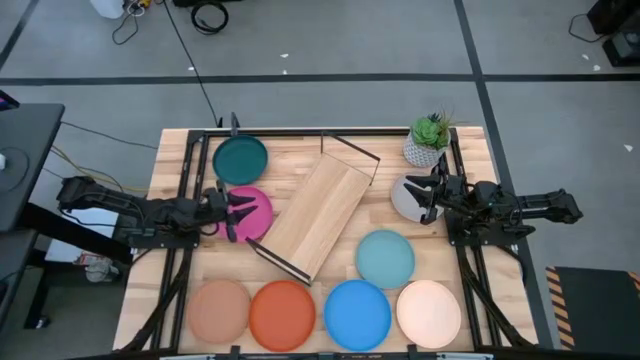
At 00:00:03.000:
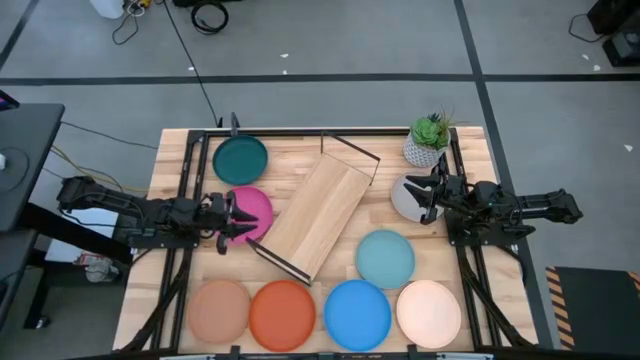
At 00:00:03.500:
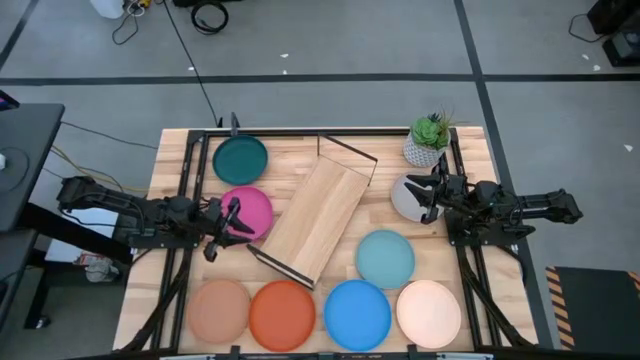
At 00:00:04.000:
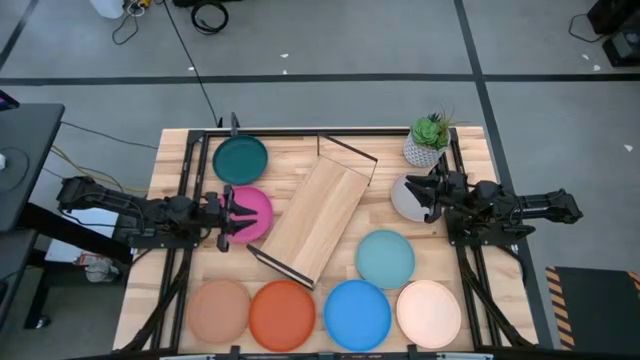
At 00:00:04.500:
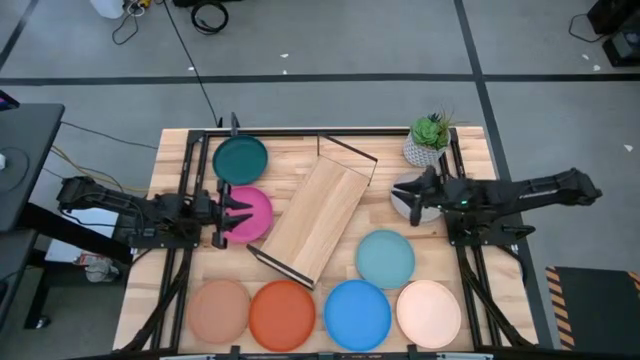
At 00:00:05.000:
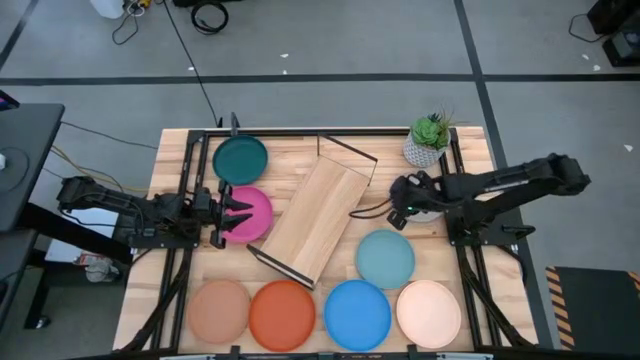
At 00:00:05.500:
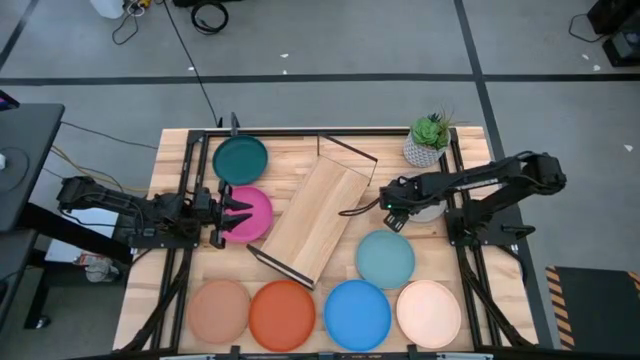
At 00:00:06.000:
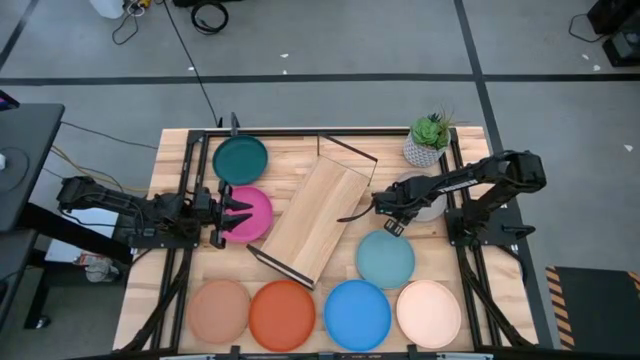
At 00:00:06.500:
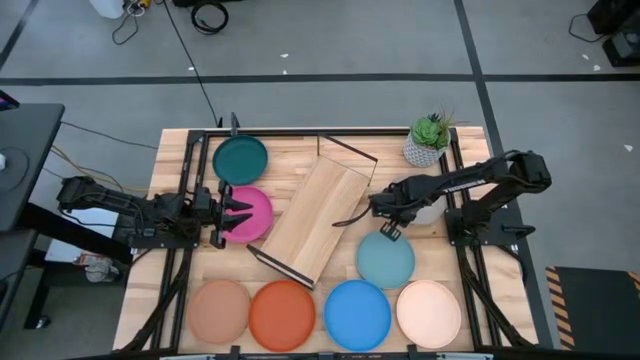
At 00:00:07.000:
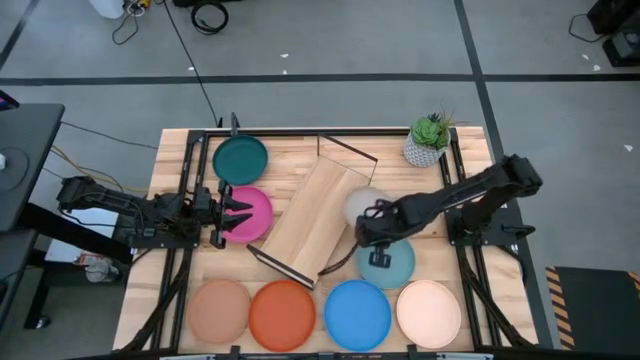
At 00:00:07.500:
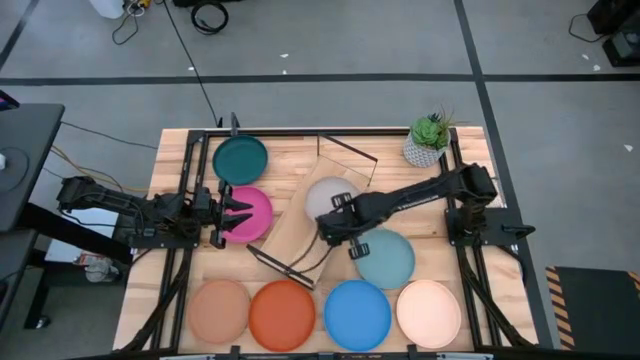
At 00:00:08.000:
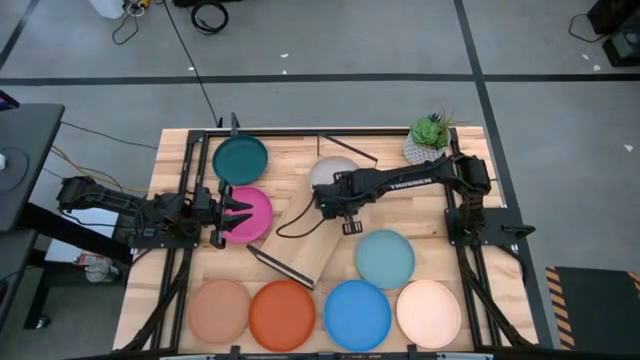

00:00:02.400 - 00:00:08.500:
Task: Place and stack plates onto a shelf
Put the gray plate on the shelf

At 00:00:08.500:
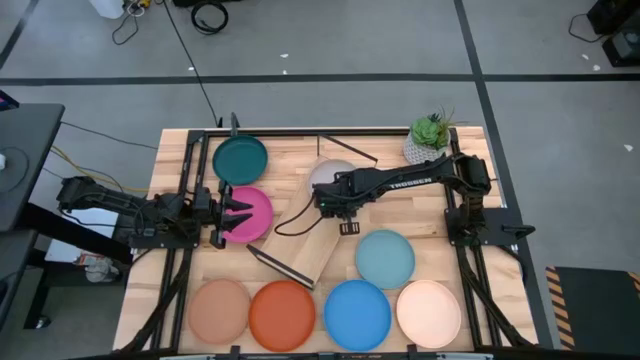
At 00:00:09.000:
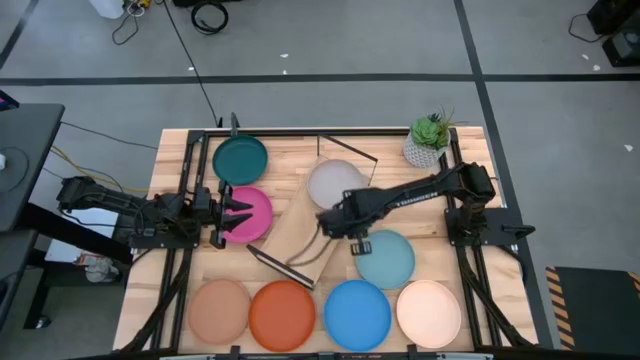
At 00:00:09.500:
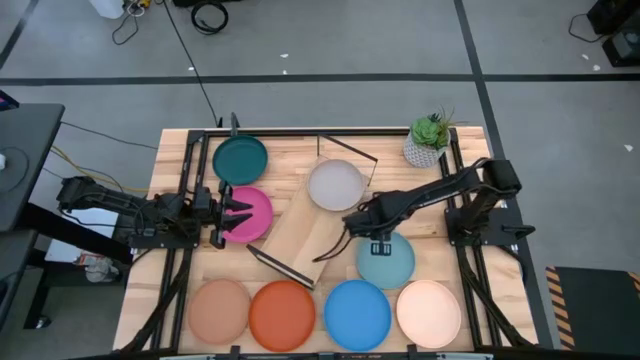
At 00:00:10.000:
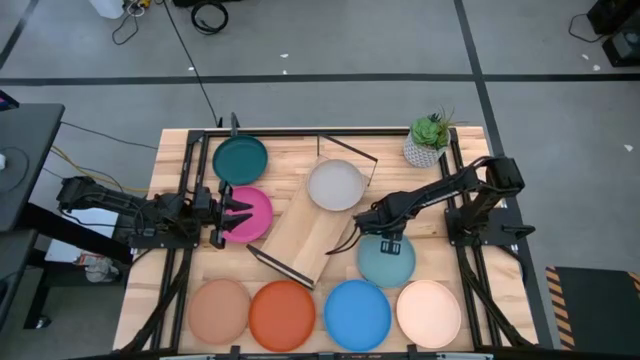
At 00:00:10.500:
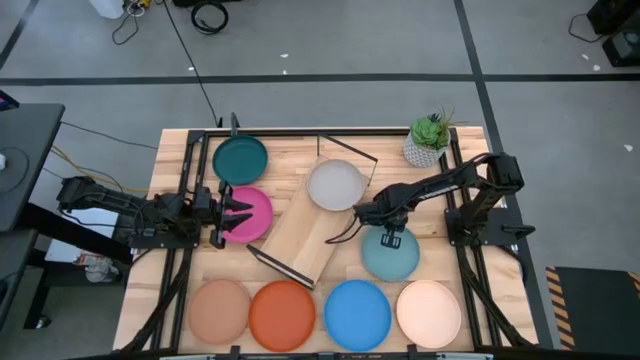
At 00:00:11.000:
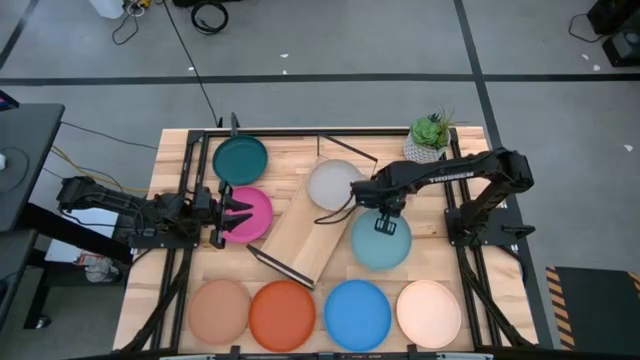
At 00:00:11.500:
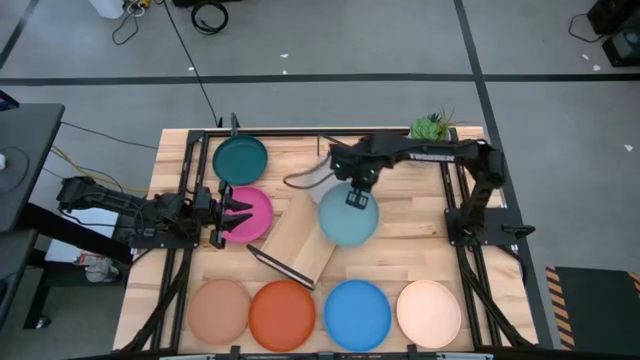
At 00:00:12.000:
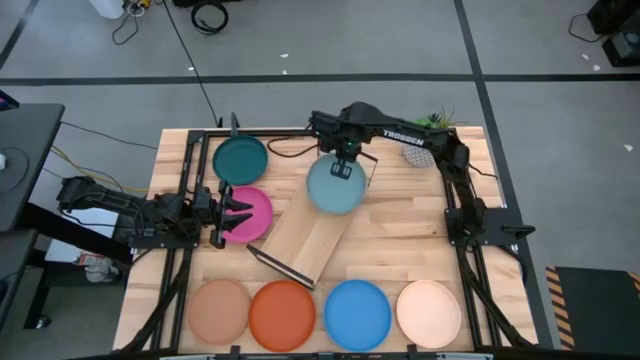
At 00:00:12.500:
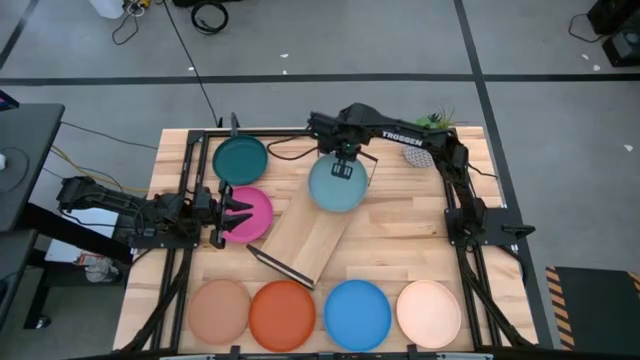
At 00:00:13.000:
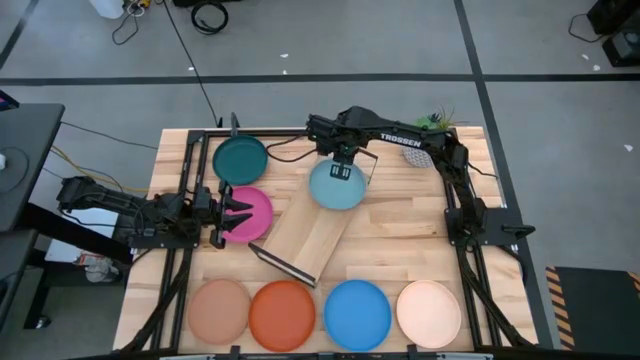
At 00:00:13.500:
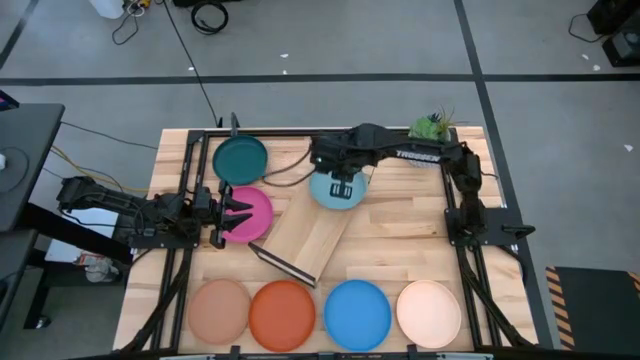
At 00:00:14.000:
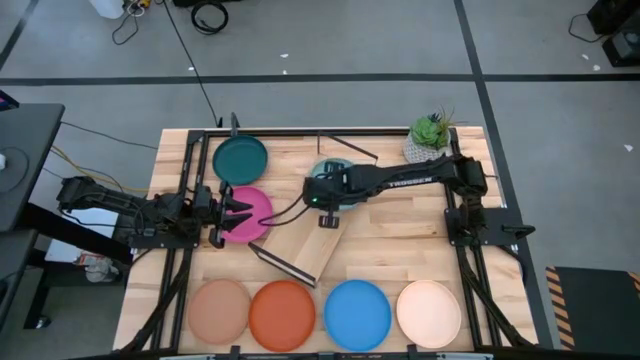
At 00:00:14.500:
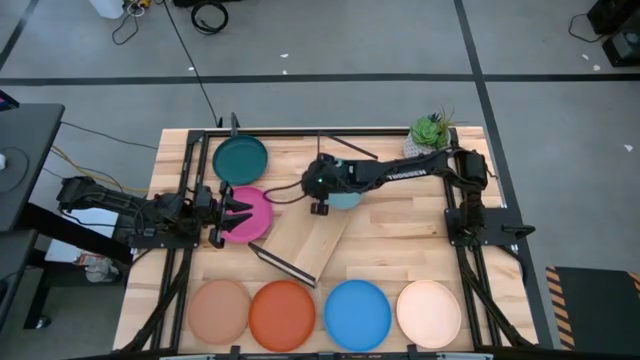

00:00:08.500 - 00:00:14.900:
Stack the green plate on top of the gray plate on the shelf

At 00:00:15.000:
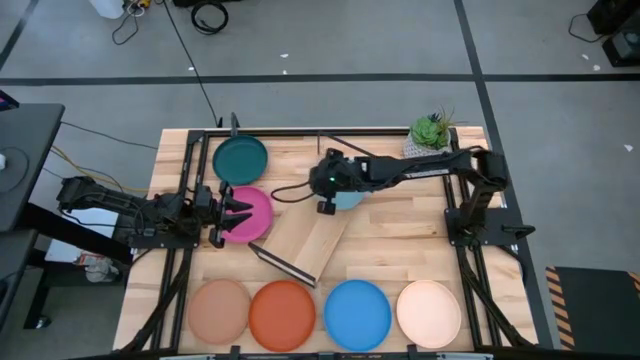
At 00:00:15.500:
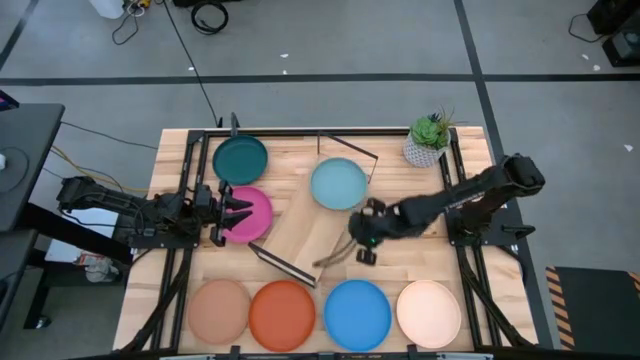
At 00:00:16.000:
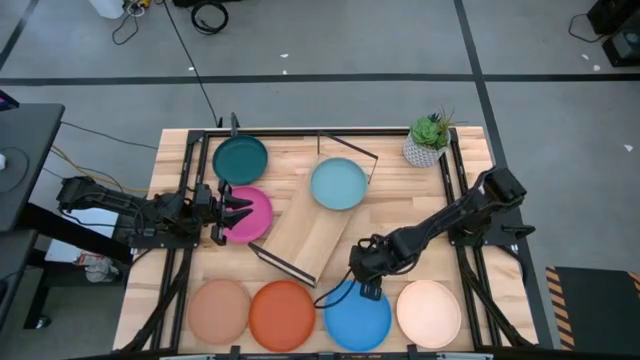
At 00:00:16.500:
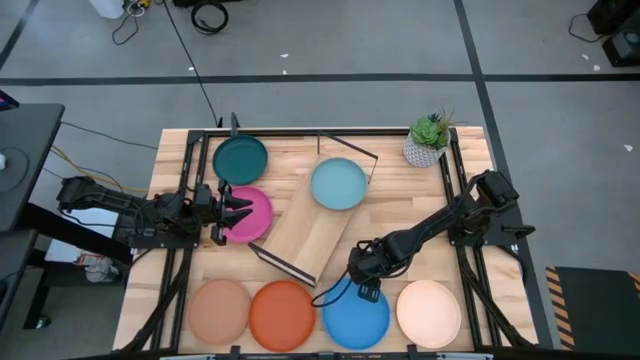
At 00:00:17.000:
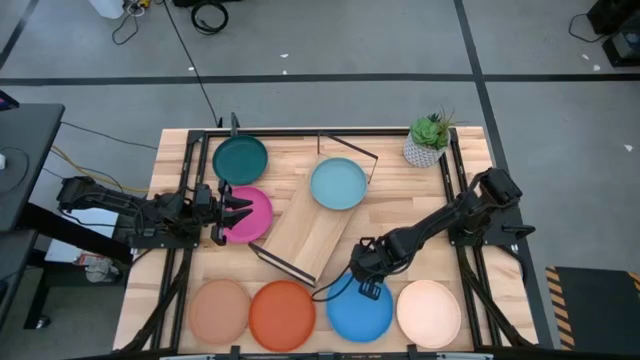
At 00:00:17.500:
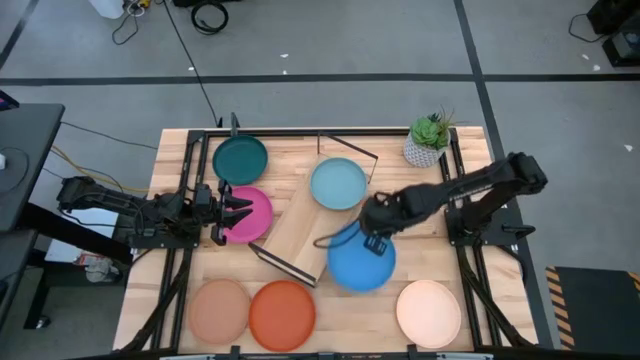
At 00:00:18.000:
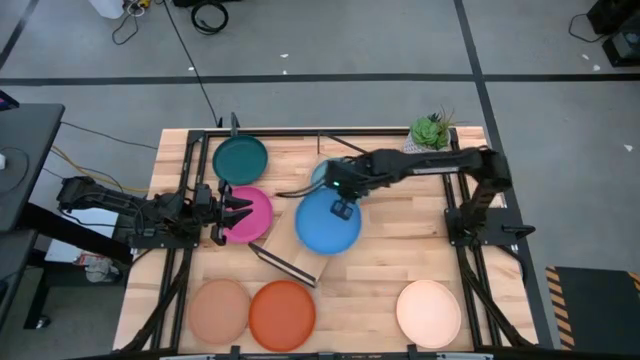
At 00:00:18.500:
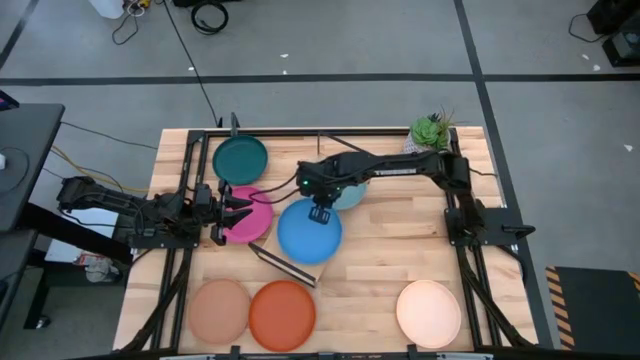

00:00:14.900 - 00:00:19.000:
Put the blue plate on the shelf

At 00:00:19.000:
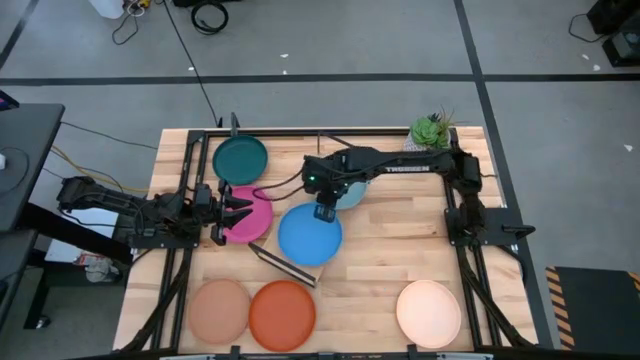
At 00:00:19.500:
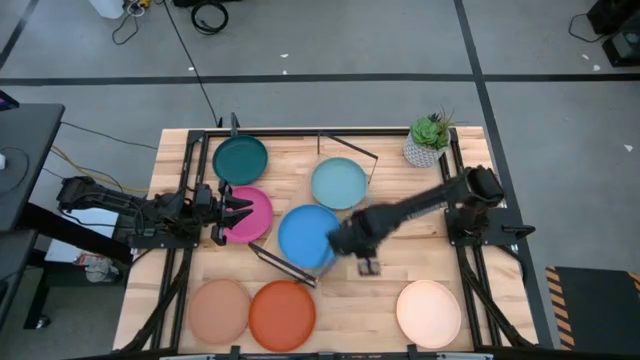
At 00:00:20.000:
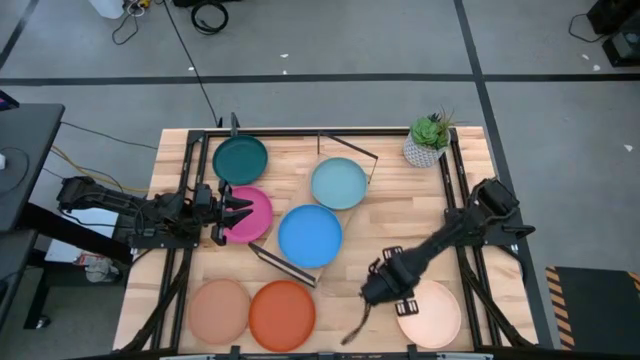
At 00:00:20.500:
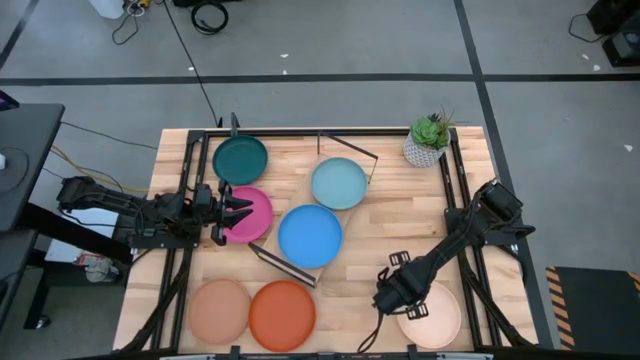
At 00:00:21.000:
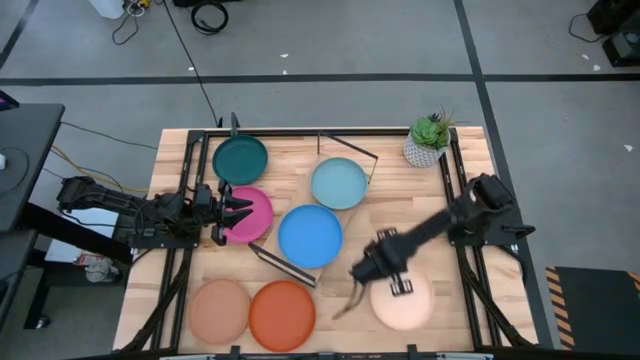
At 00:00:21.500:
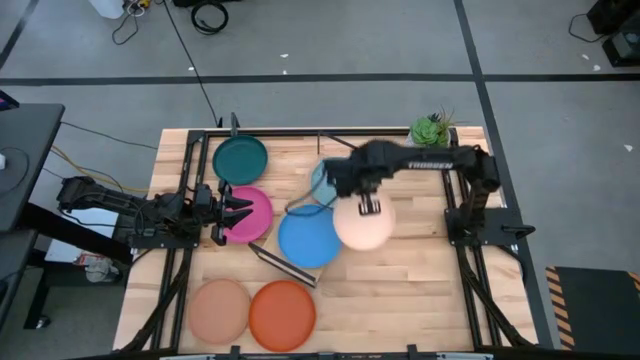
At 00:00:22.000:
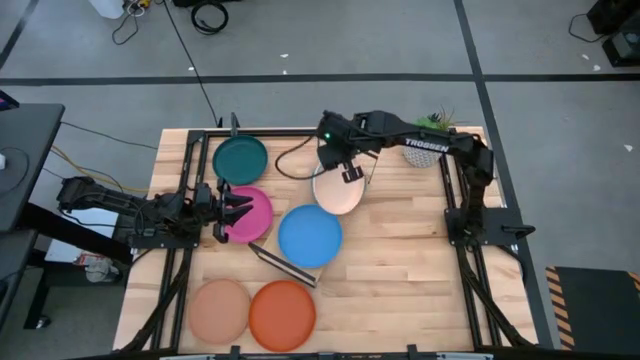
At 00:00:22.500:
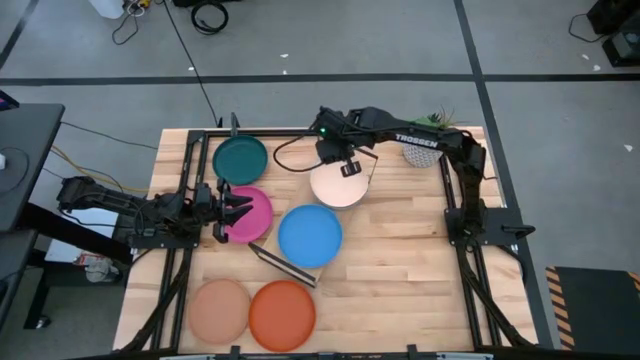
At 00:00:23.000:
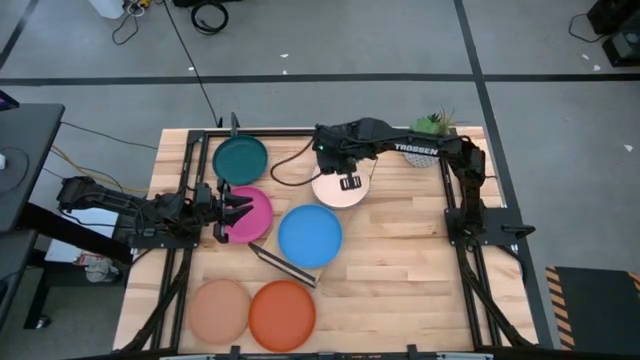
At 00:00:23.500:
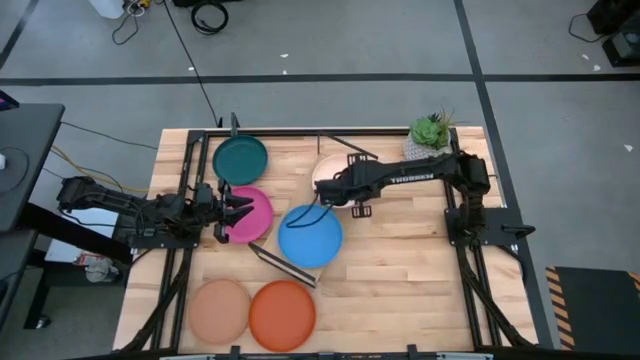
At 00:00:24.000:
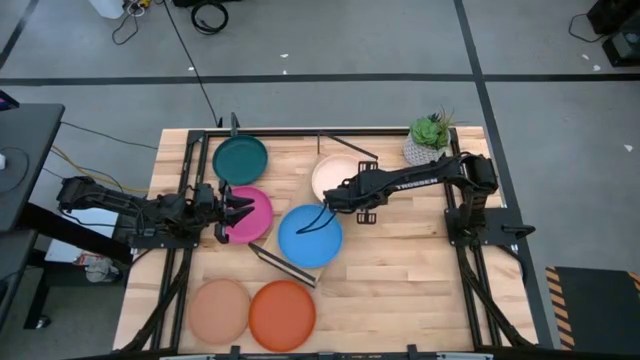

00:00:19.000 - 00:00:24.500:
Stack the light orange plate on top of the green plate on the shelf
